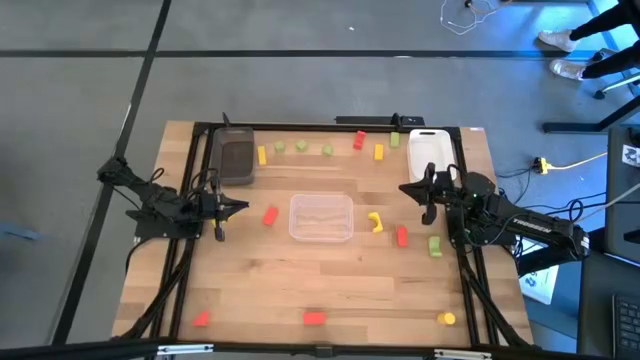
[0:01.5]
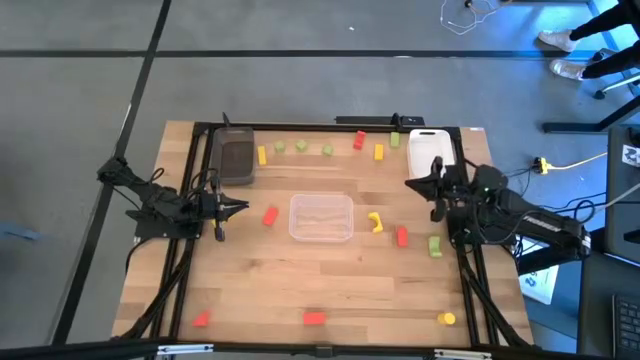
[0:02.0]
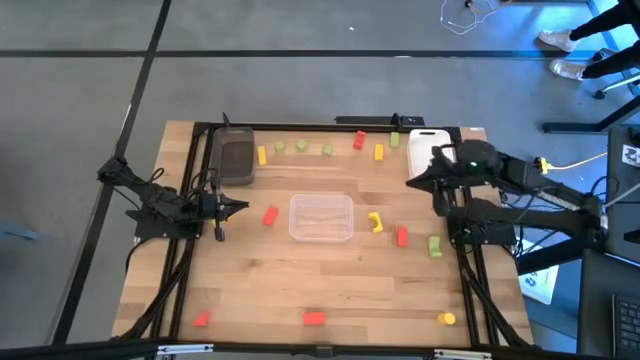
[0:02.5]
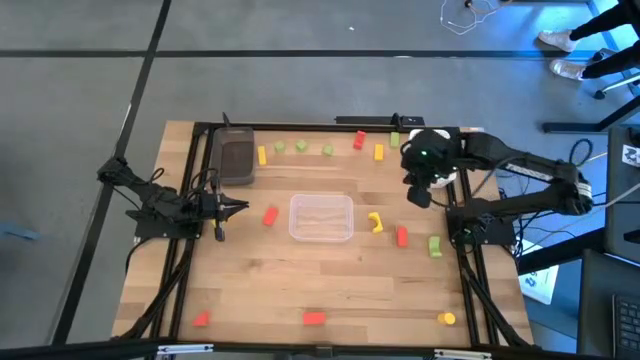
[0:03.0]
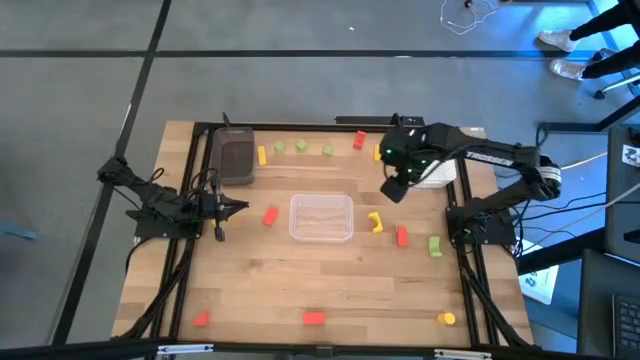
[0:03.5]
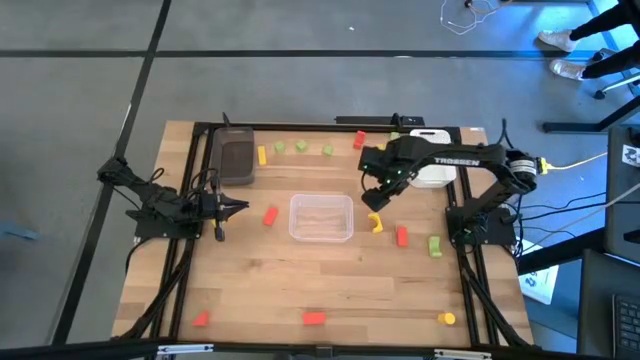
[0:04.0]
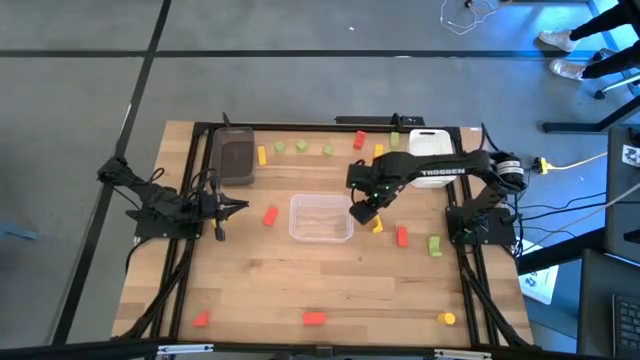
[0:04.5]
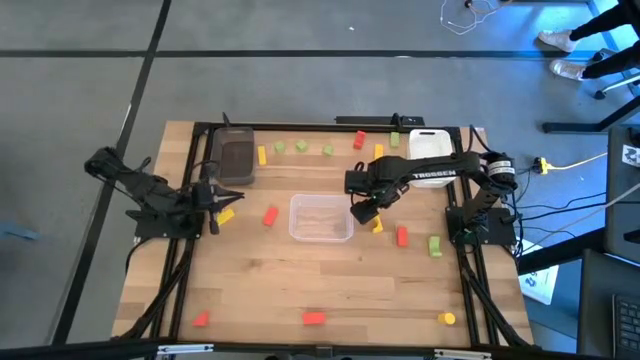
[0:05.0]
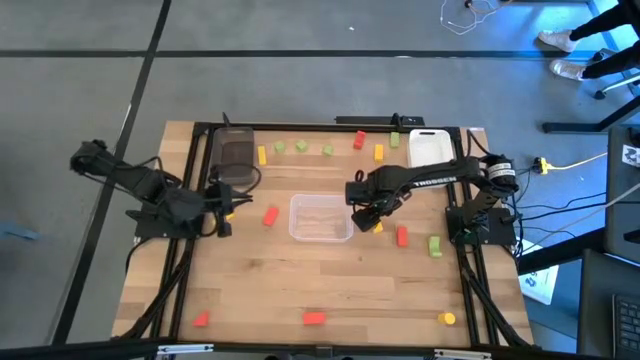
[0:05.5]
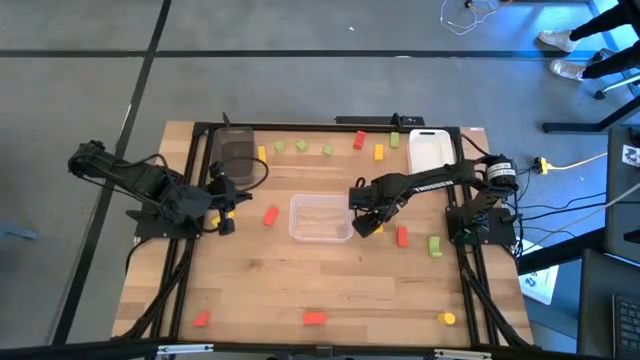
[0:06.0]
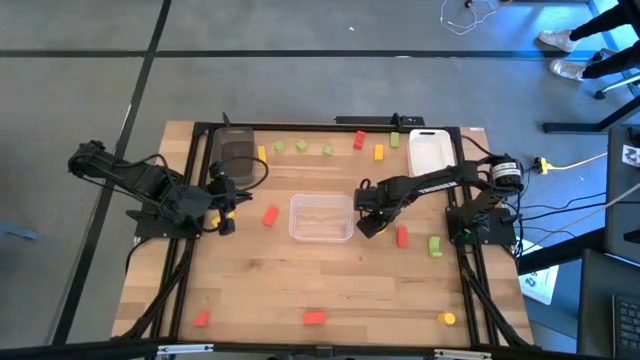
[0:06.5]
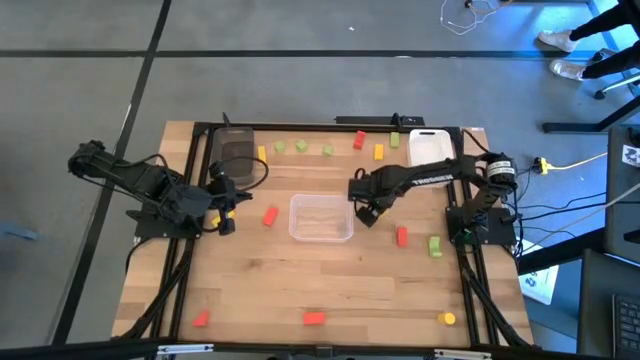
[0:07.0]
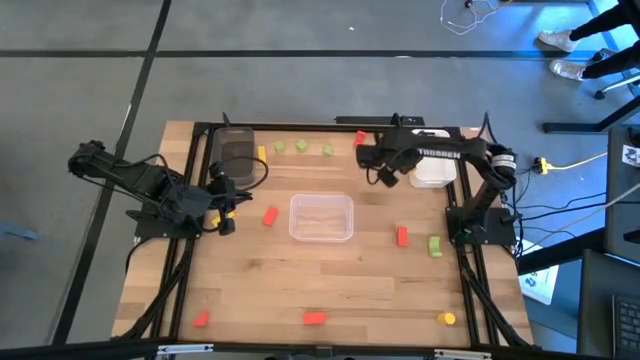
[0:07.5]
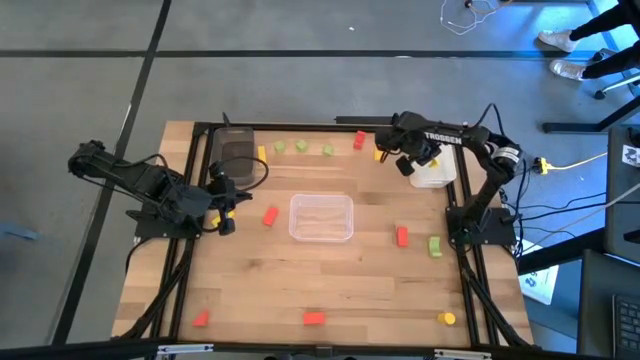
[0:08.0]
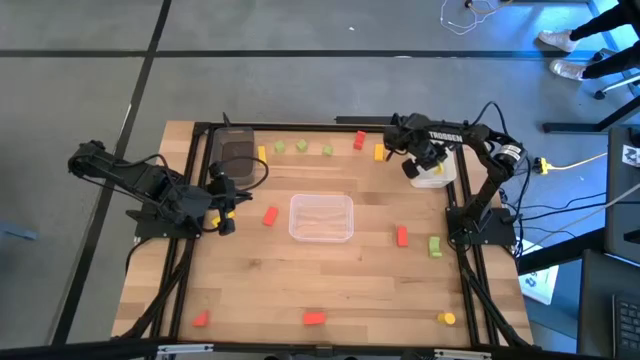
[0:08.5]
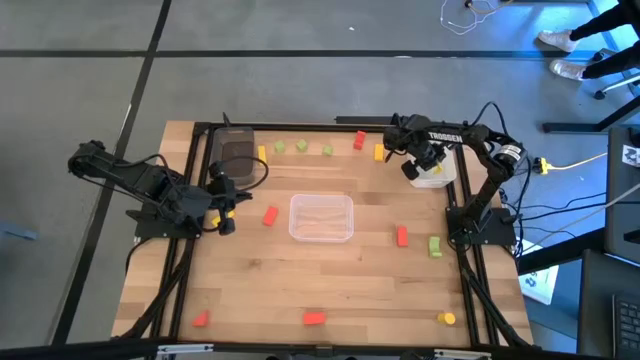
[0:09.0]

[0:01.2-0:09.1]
Task: Sort & place blocks by color
Put the yellow block into the white bin

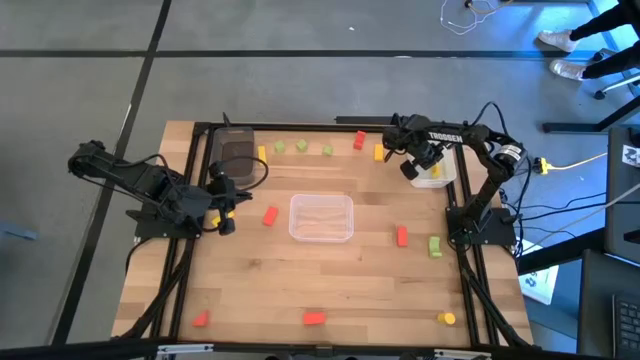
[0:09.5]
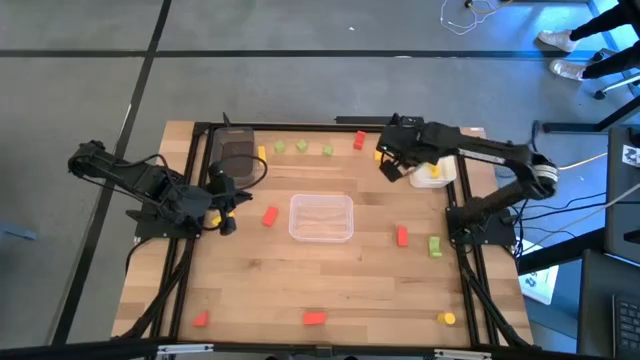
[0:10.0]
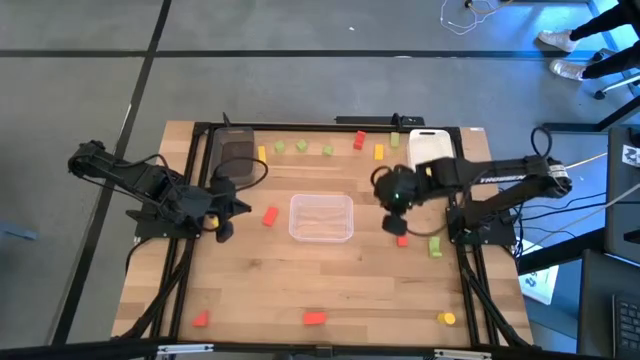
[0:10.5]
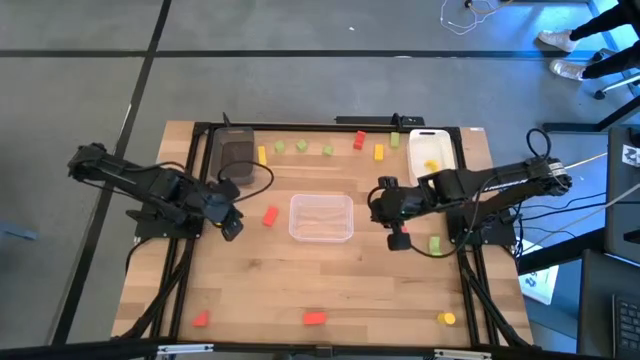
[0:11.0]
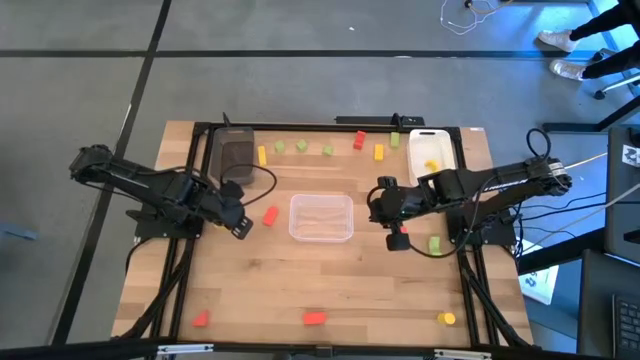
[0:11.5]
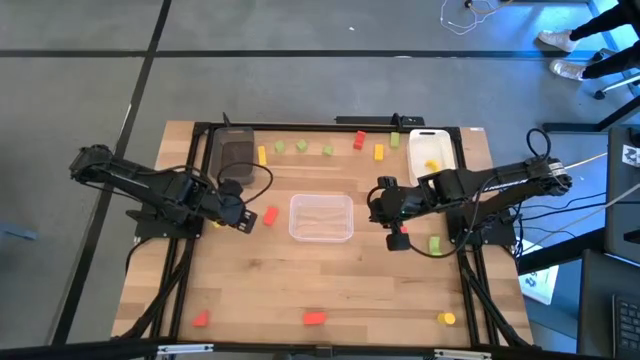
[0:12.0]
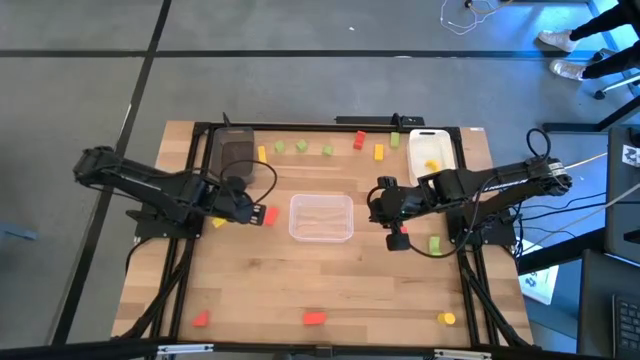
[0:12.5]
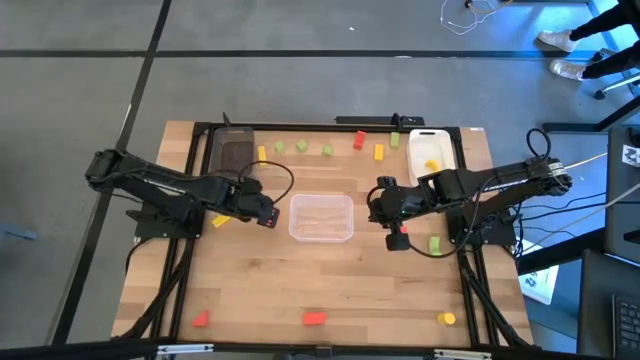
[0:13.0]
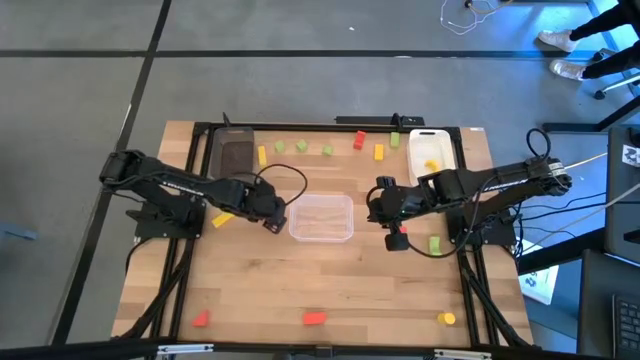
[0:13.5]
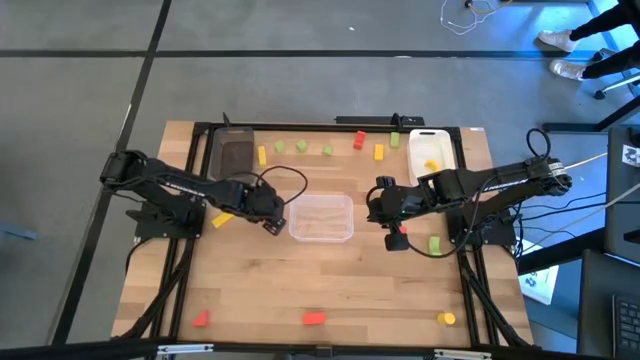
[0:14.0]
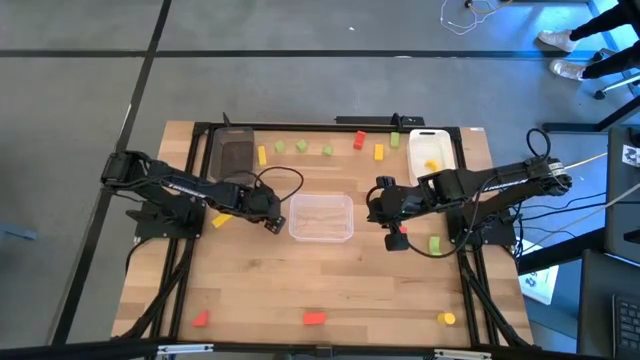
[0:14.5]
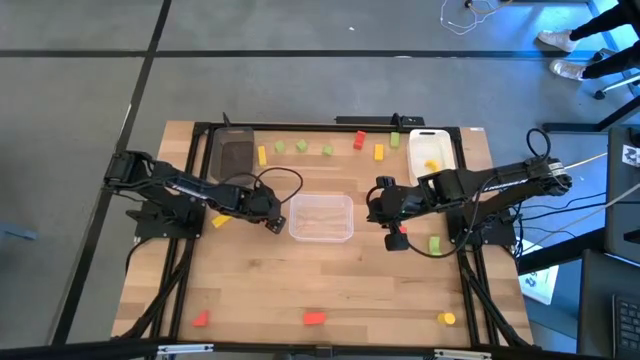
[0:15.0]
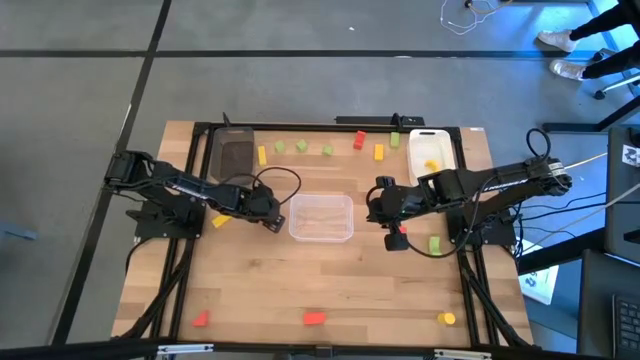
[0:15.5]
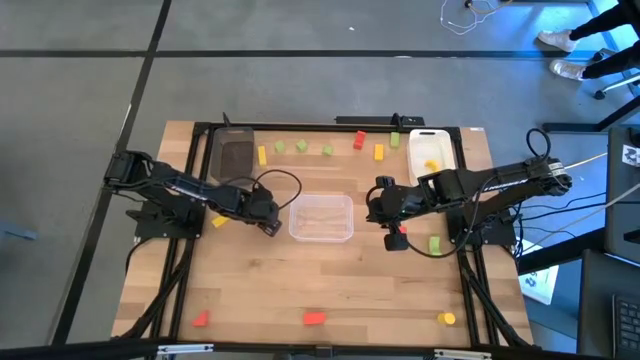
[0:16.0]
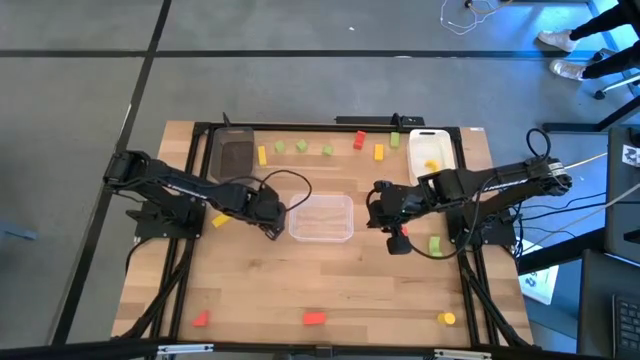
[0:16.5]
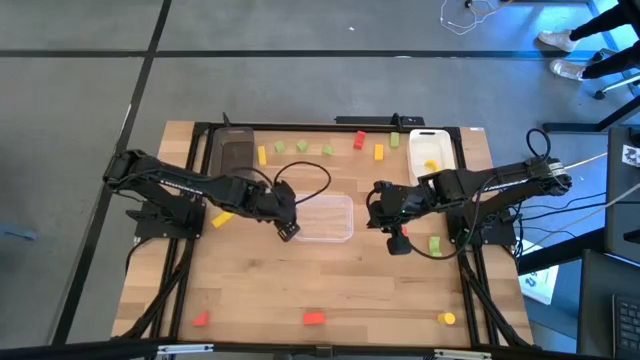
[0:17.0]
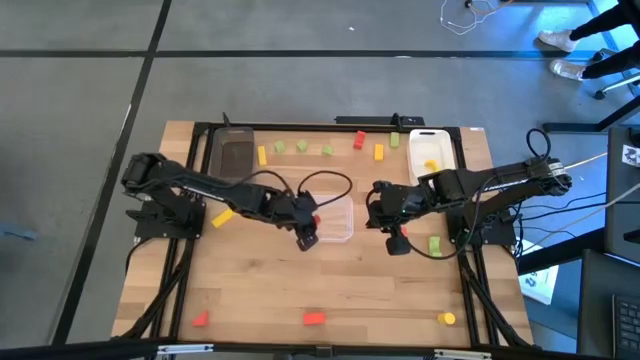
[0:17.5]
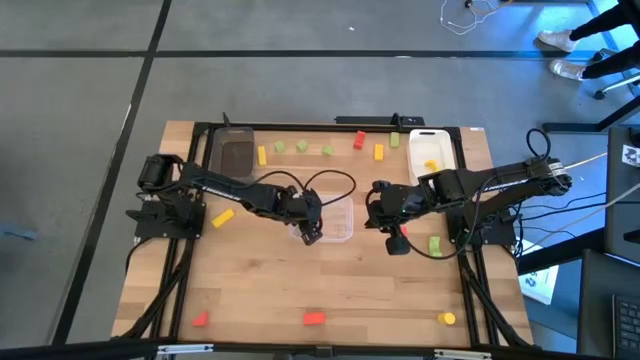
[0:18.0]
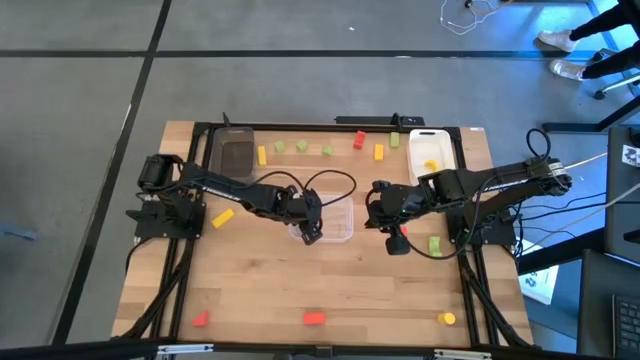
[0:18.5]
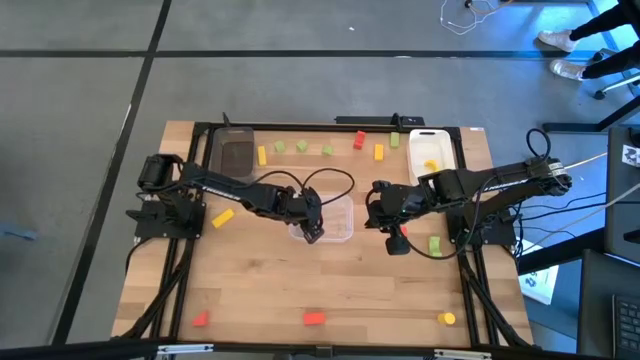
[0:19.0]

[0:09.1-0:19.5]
Put the orange block into the transparent bin

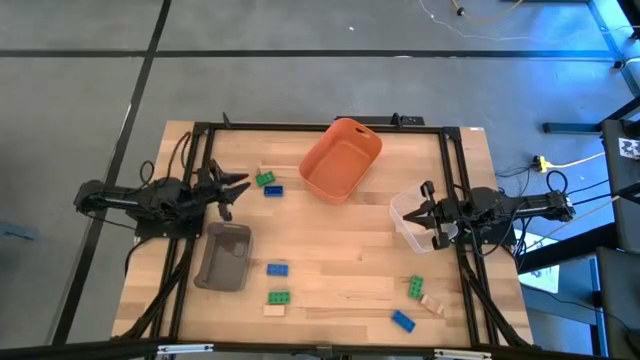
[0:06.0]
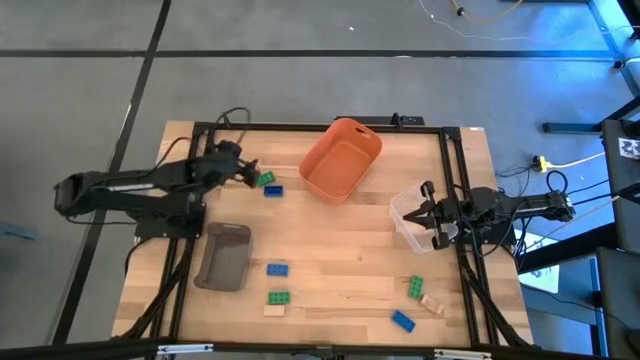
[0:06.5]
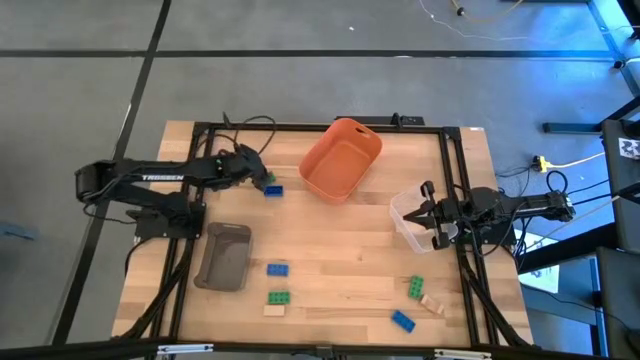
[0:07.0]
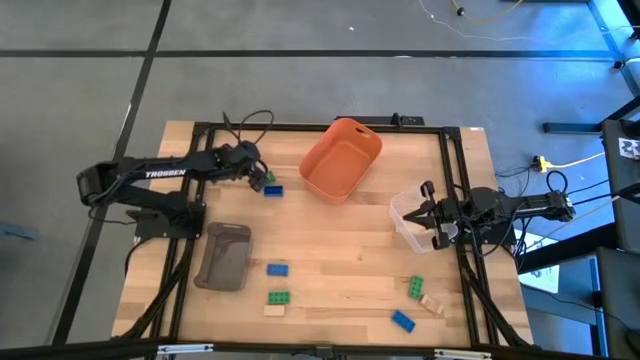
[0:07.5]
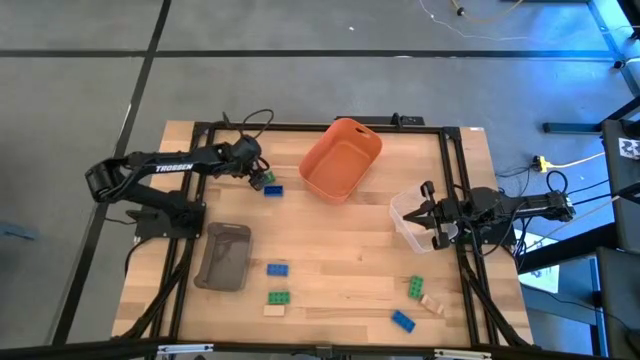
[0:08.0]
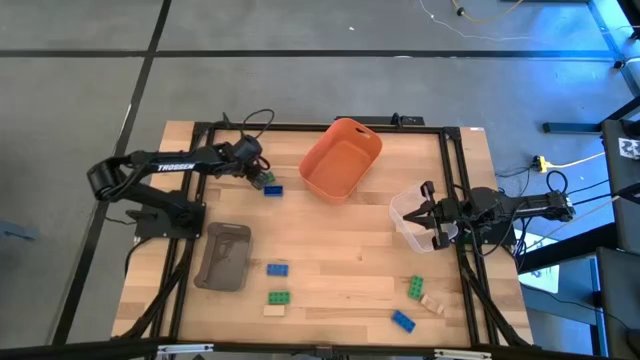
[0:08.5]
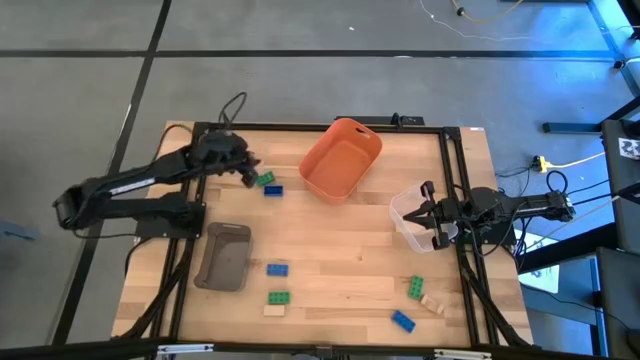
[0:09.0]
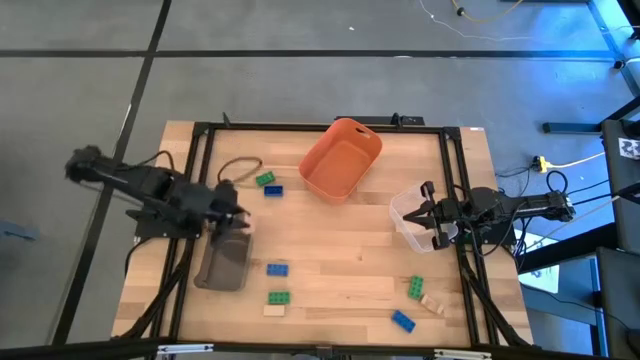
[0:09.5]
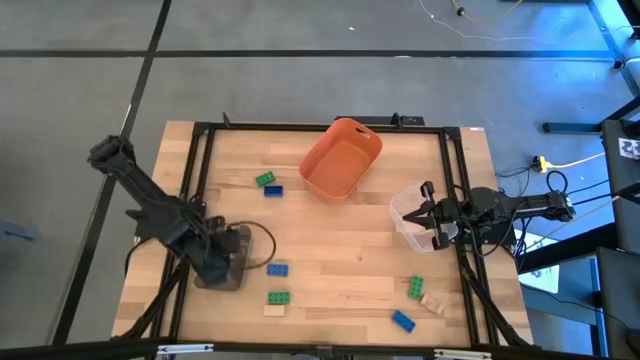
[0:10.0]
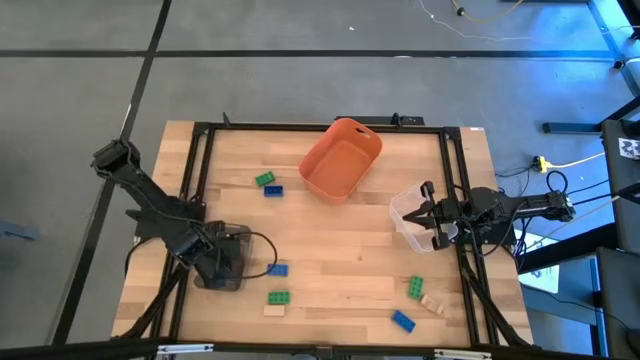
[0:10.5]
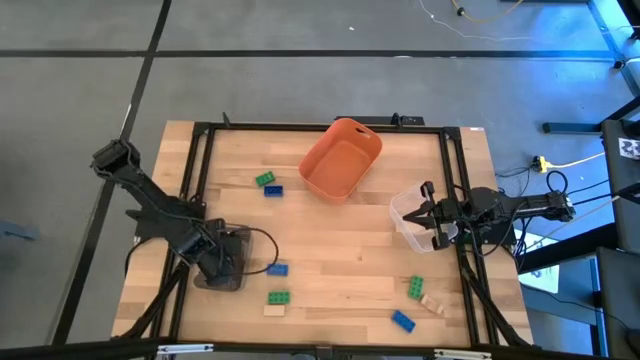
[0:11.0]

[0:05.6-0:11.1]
Task: Sort & place blocks by color
Put the top brown block into the black bin
